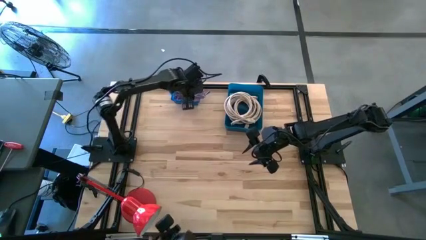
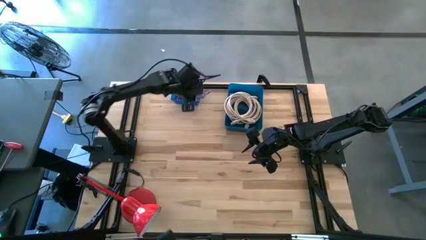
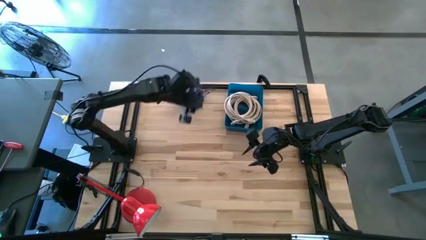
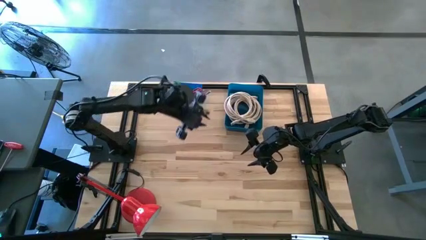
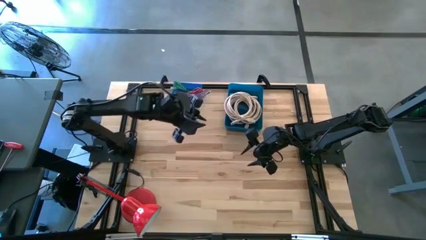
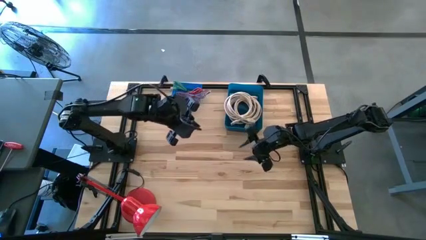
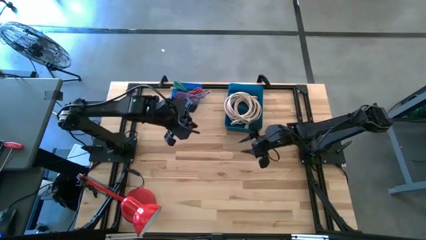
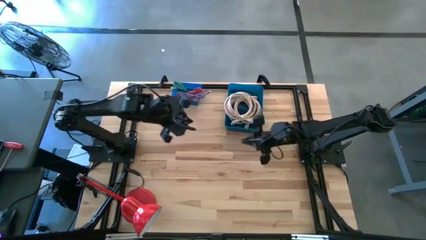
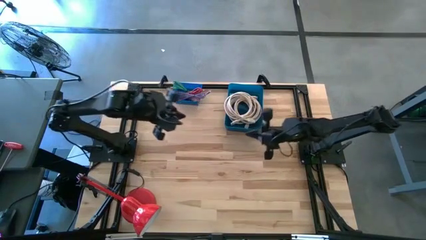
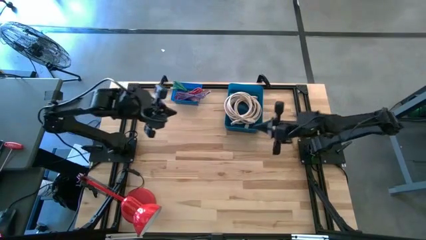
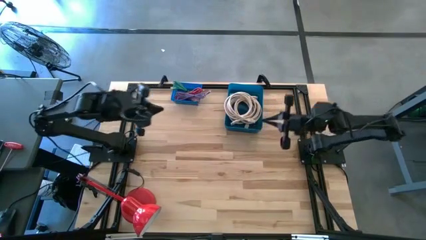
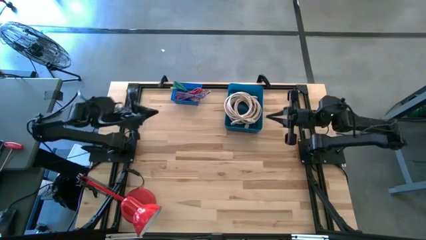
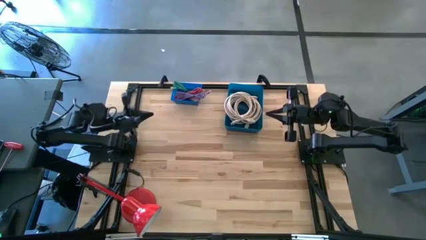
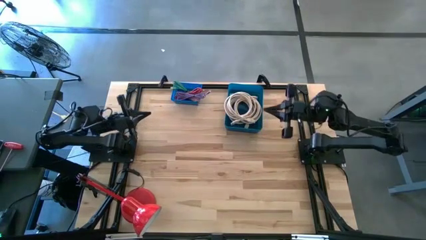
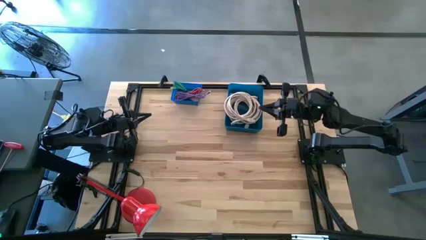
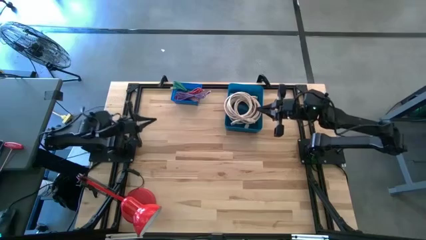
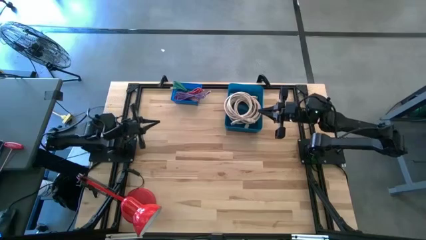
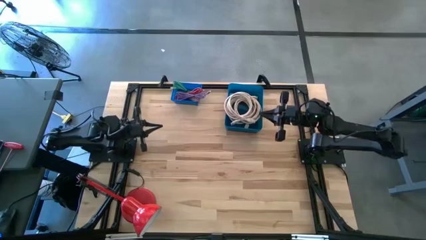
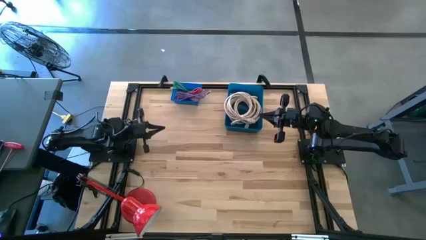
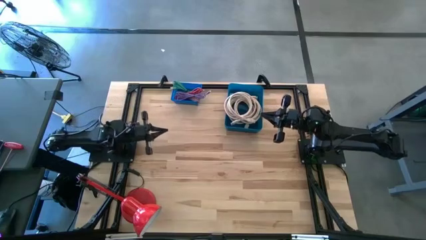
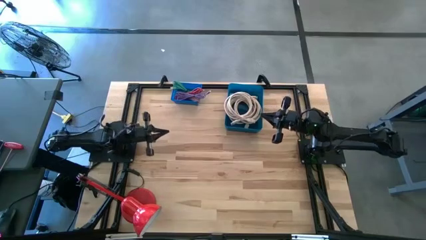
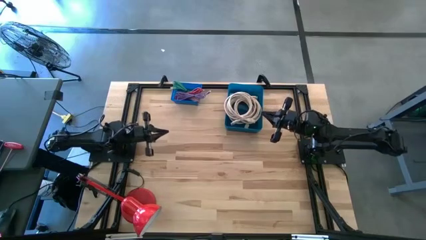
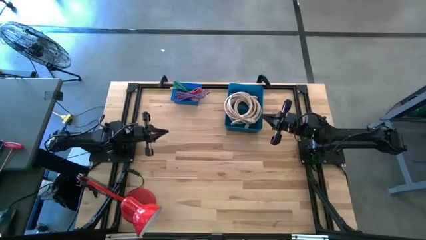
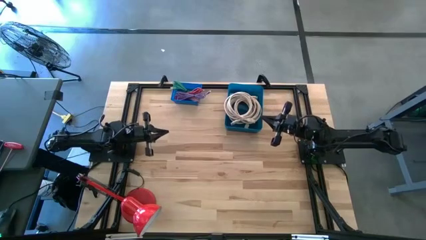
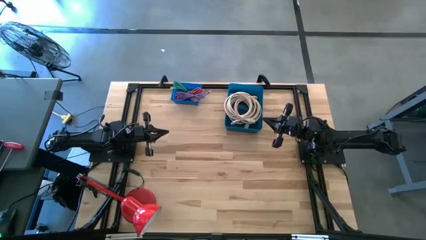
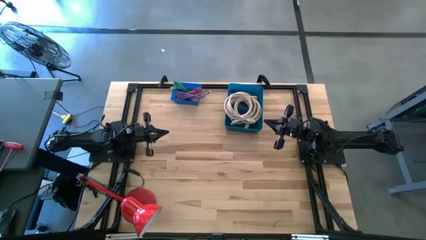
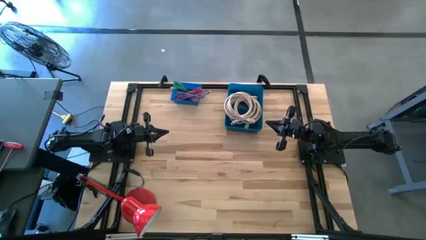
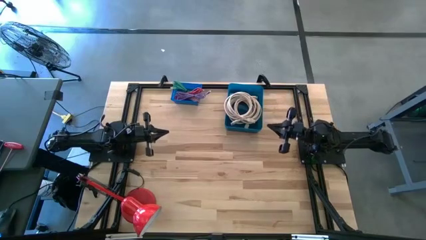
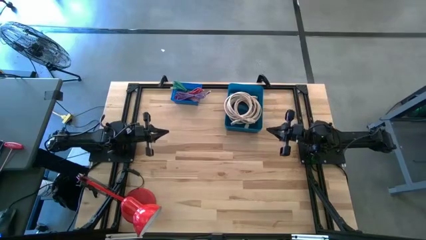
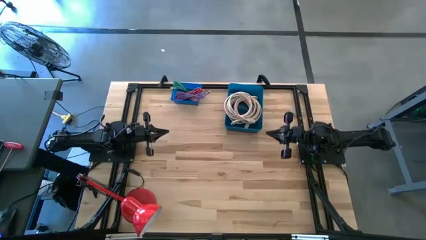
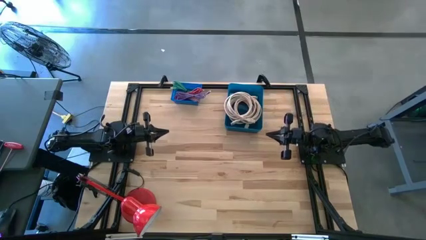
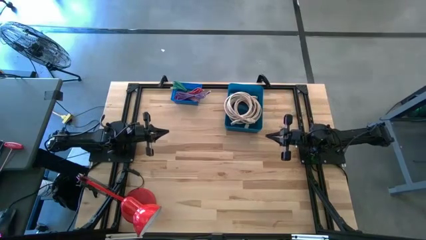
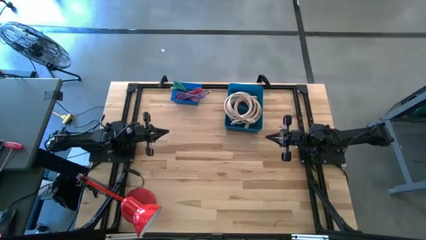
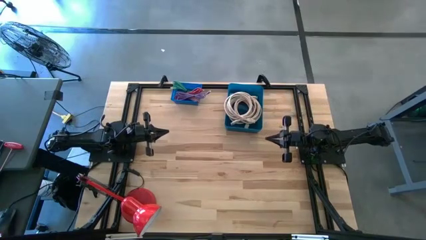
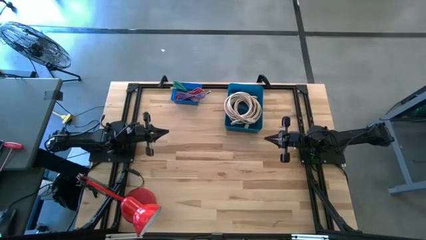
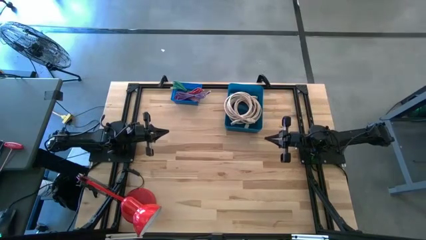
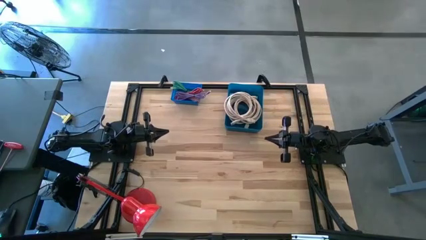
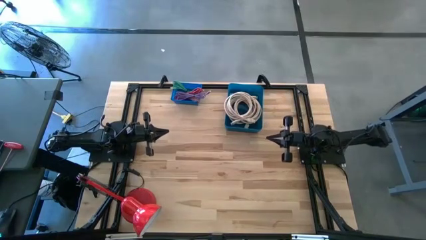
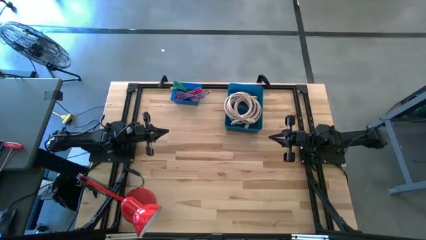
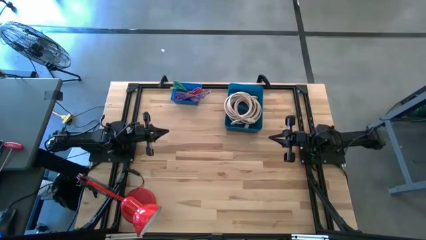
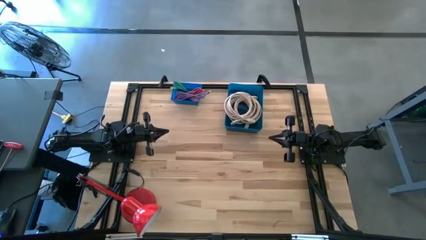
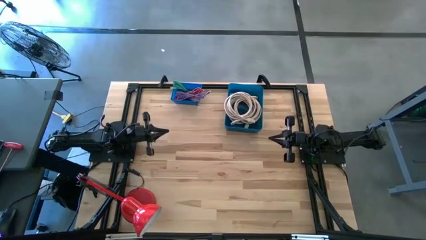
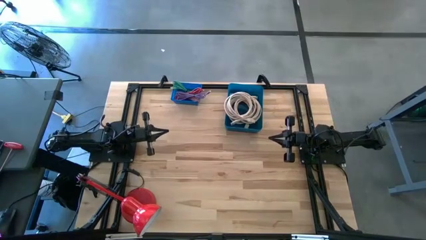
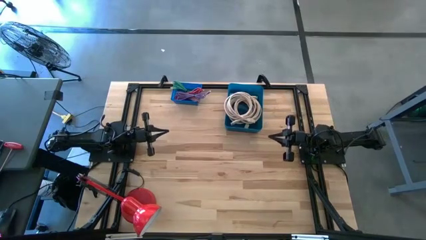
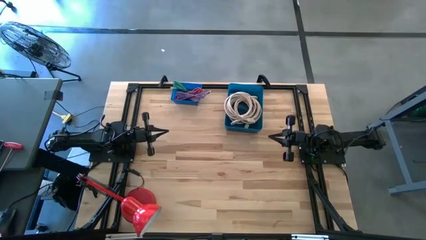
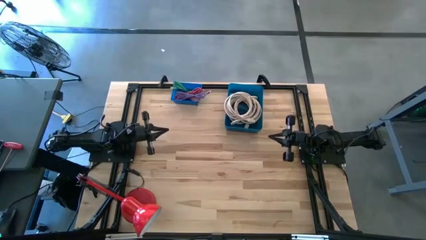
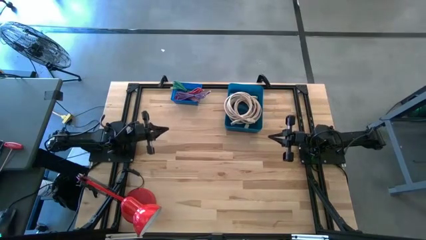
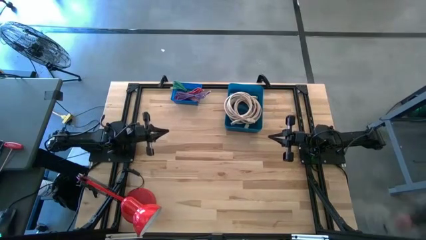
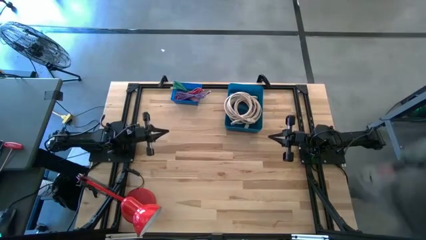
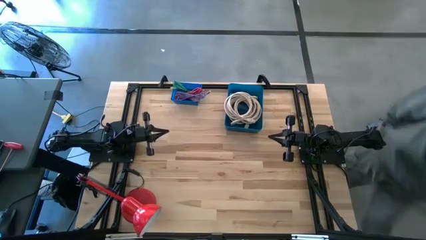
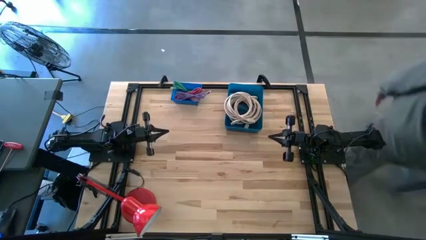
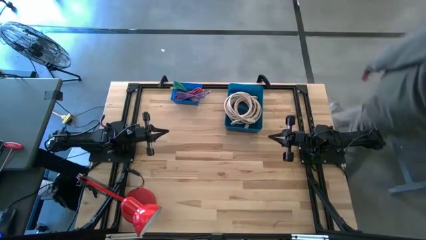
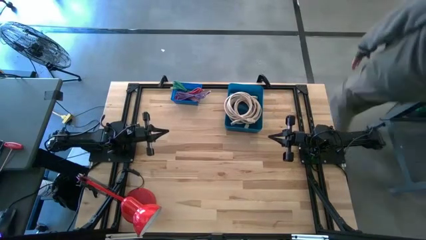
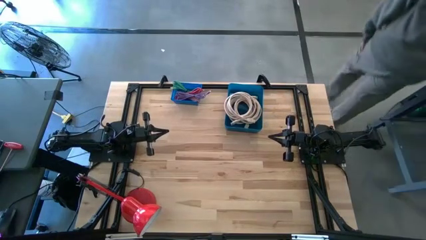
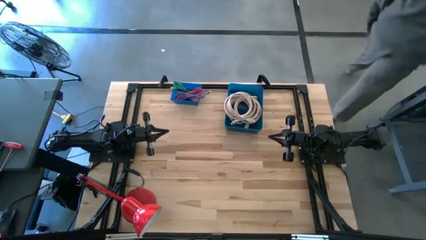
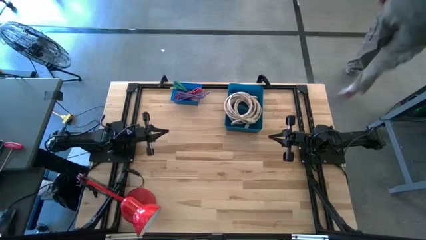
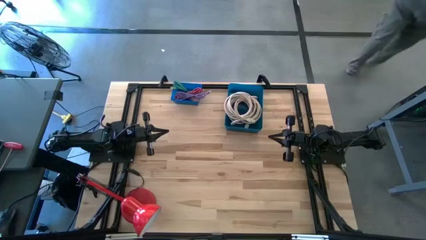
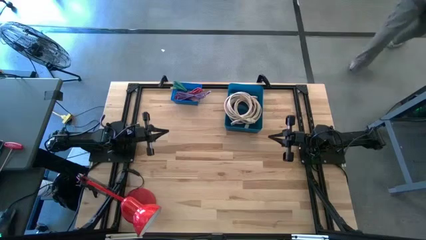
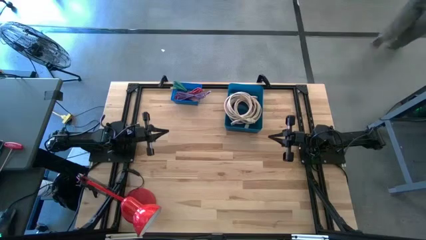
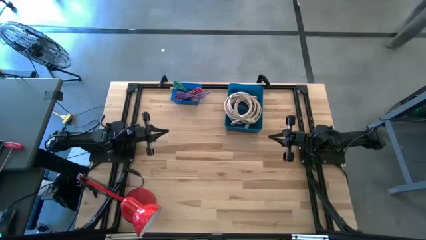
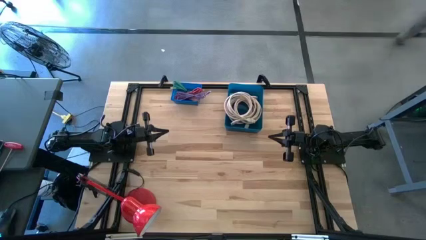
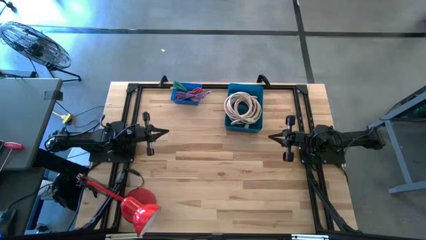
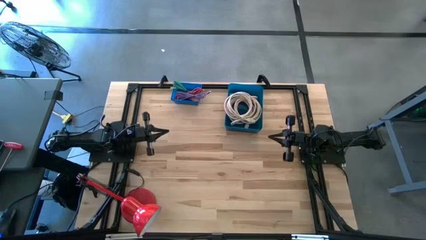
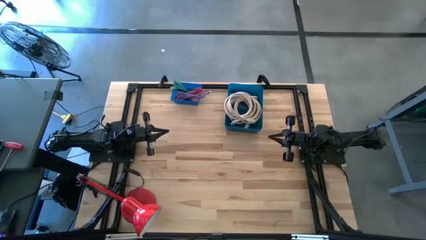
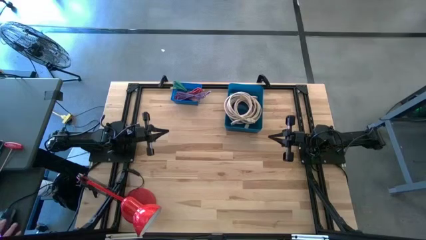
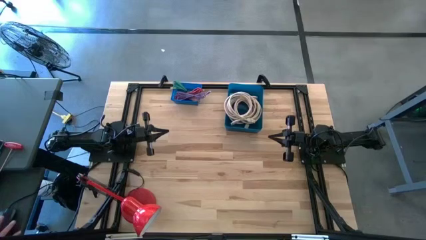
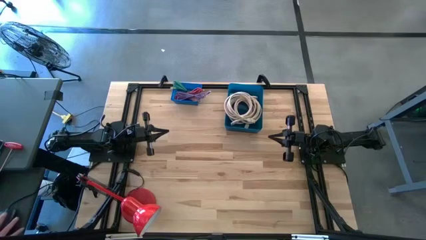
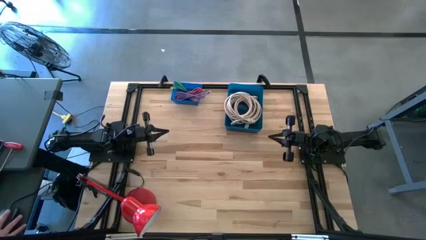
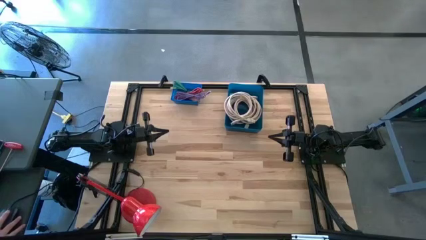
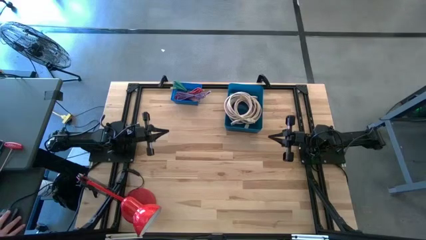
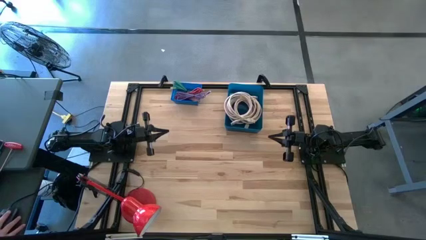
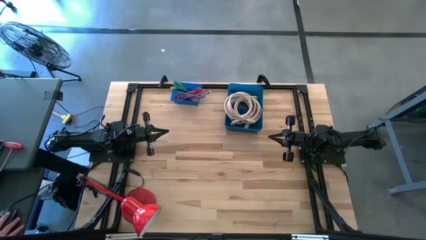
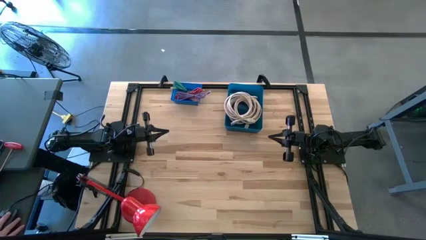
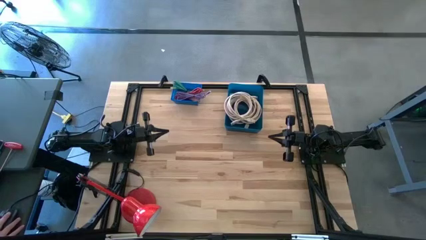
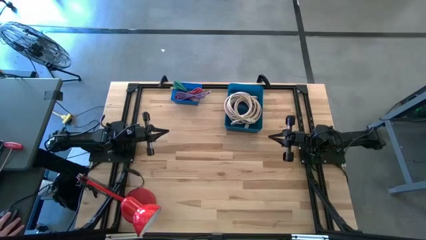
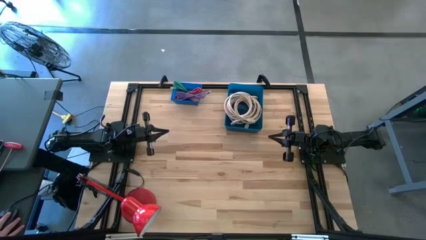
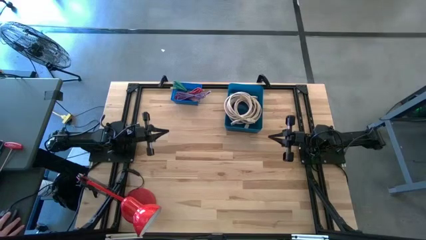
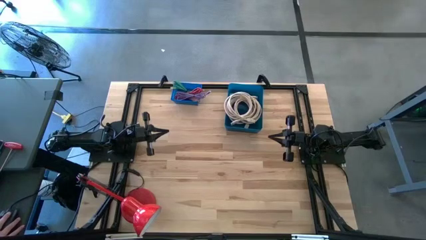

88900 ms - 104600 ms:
Task: Pick & Place USB Port
Return to Home Position
